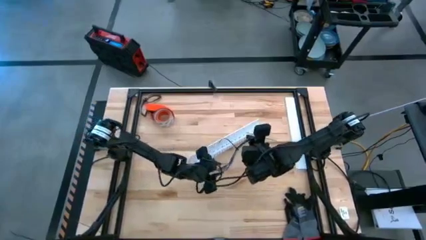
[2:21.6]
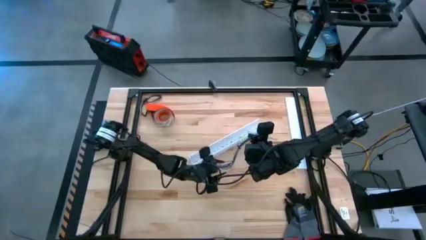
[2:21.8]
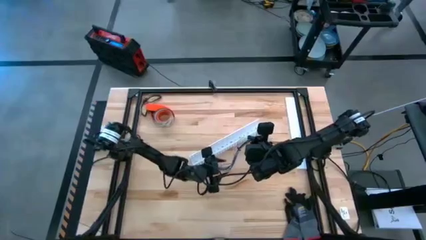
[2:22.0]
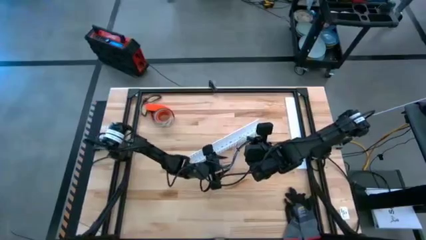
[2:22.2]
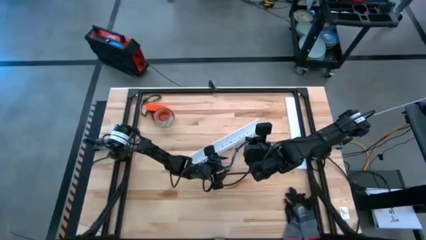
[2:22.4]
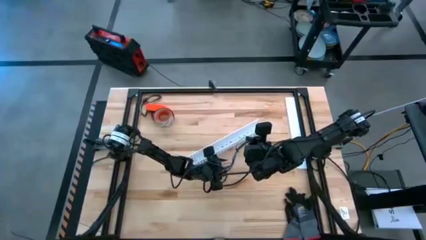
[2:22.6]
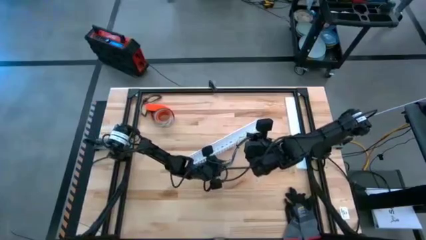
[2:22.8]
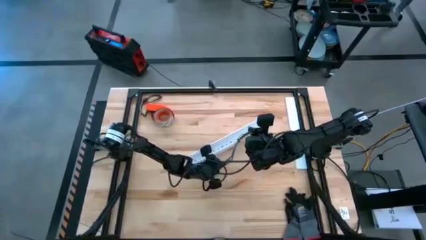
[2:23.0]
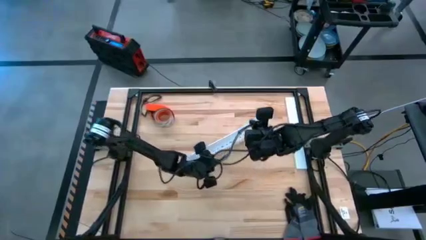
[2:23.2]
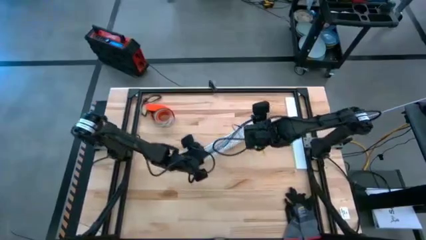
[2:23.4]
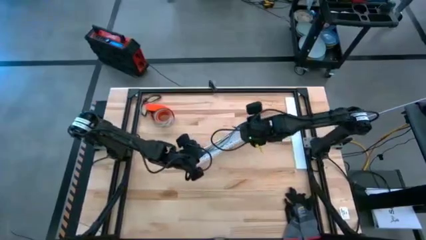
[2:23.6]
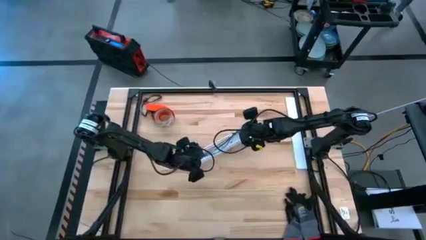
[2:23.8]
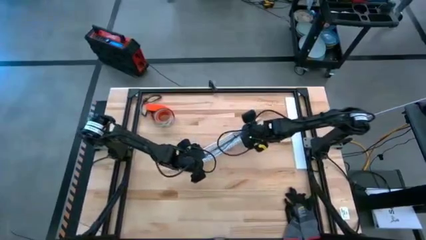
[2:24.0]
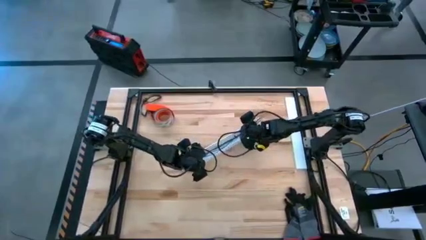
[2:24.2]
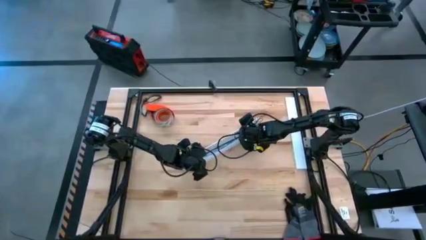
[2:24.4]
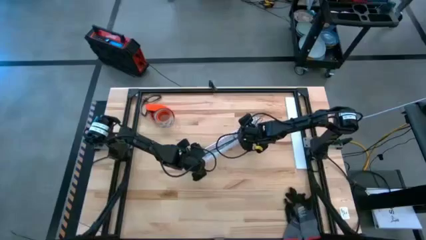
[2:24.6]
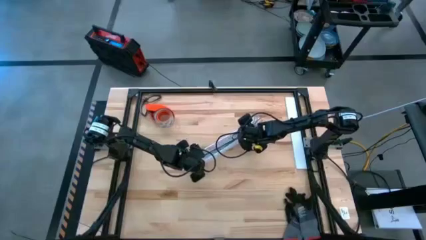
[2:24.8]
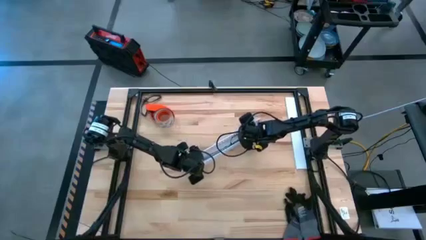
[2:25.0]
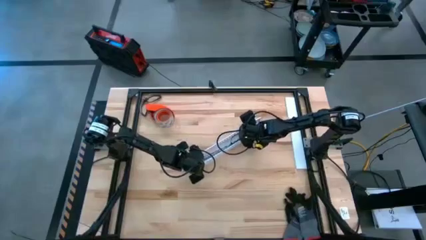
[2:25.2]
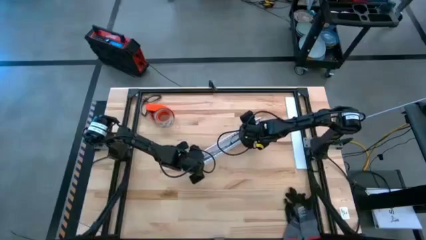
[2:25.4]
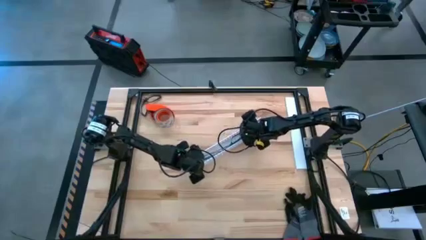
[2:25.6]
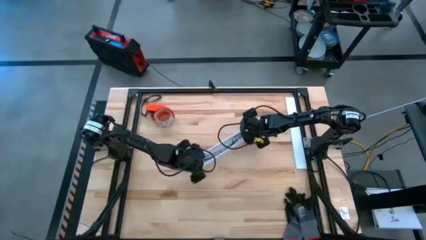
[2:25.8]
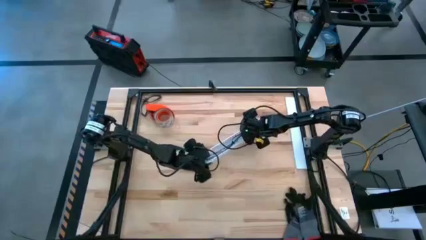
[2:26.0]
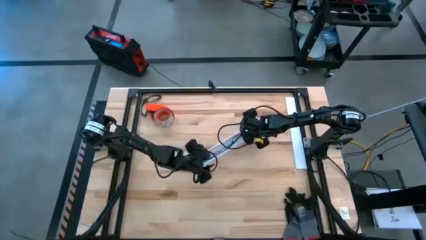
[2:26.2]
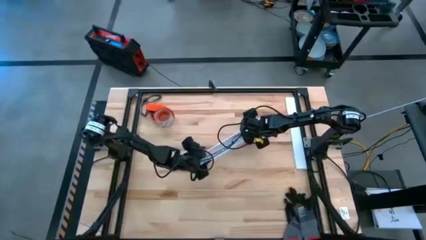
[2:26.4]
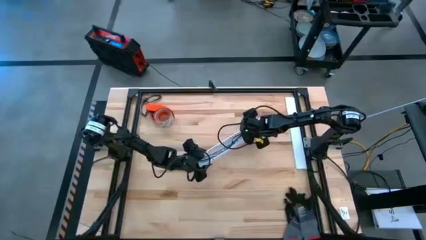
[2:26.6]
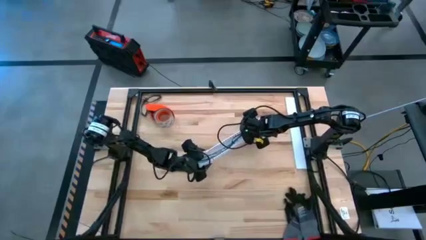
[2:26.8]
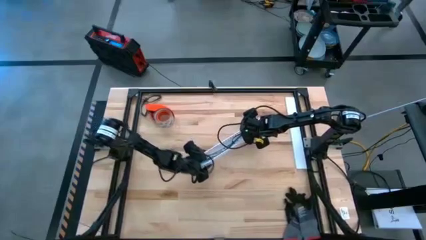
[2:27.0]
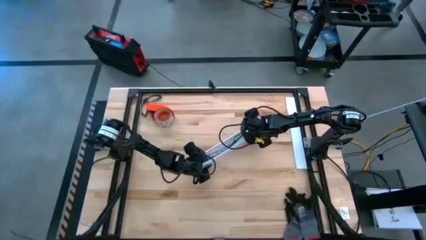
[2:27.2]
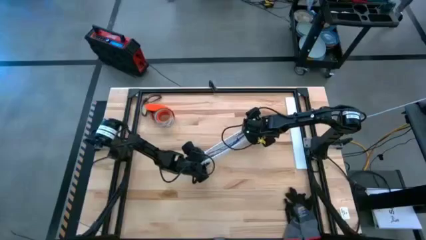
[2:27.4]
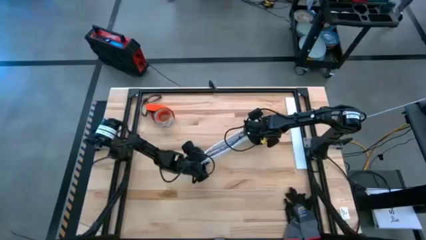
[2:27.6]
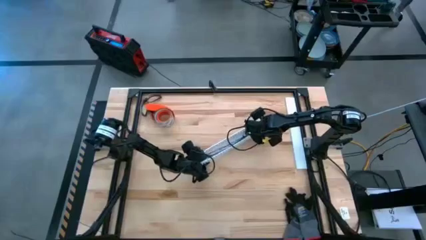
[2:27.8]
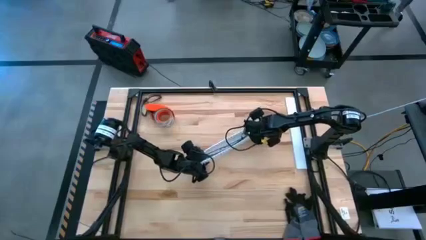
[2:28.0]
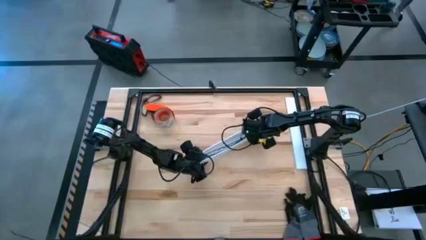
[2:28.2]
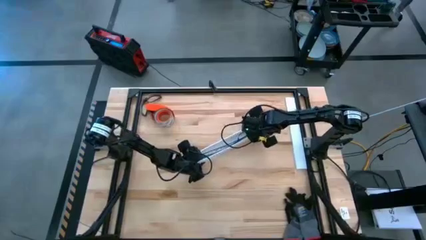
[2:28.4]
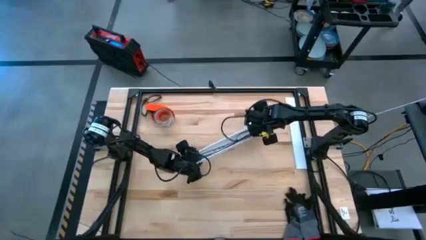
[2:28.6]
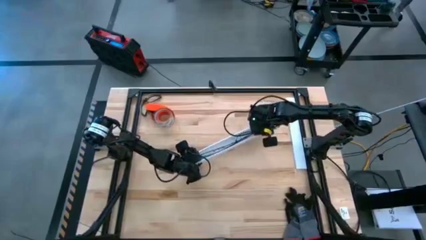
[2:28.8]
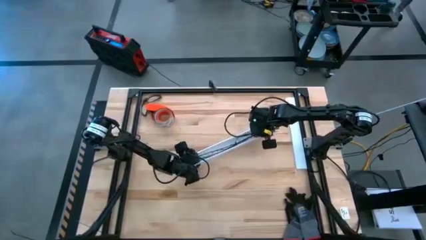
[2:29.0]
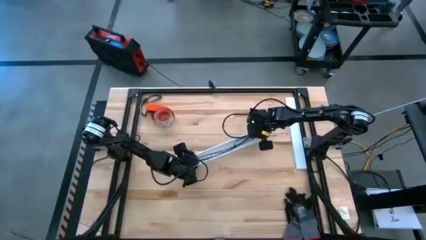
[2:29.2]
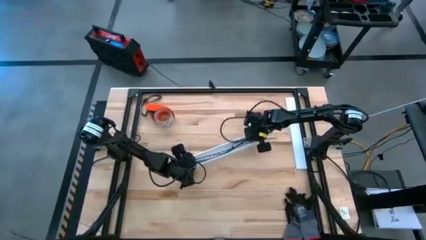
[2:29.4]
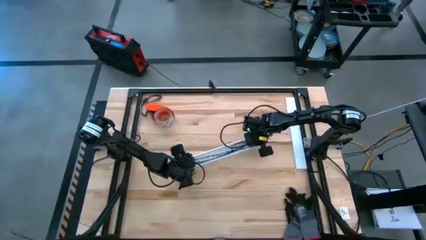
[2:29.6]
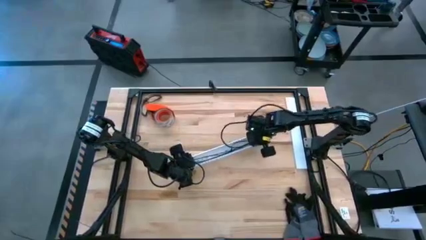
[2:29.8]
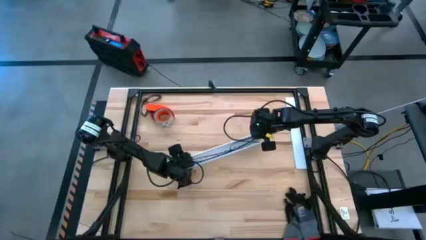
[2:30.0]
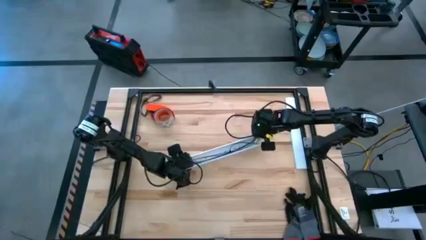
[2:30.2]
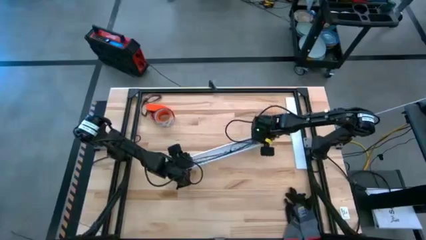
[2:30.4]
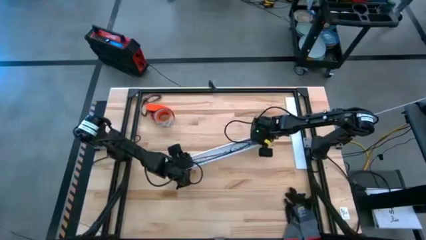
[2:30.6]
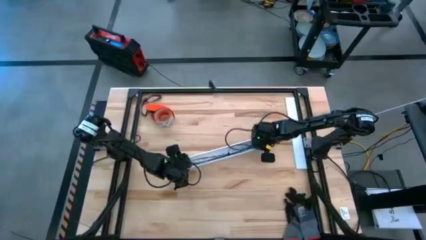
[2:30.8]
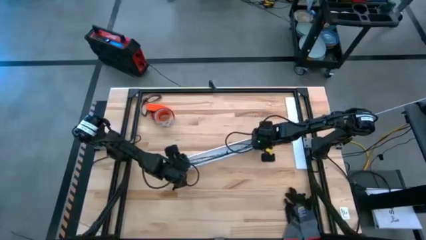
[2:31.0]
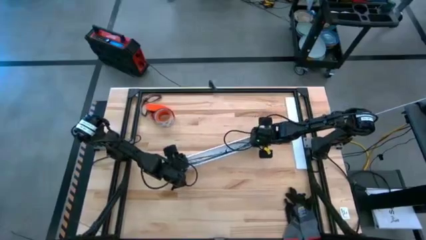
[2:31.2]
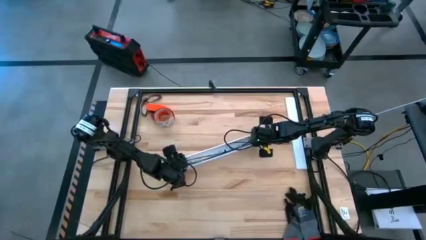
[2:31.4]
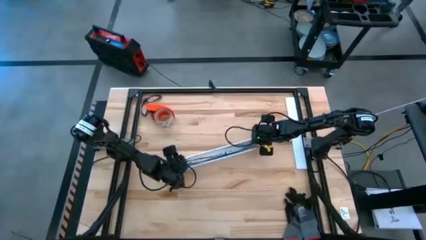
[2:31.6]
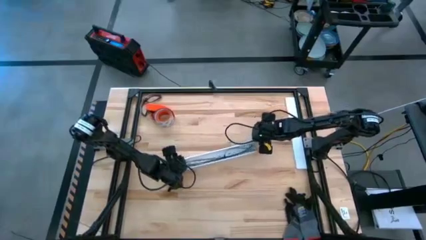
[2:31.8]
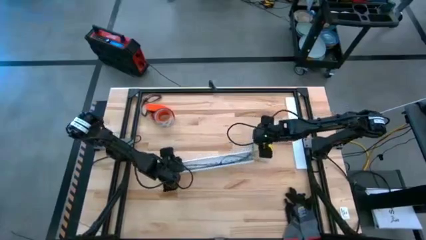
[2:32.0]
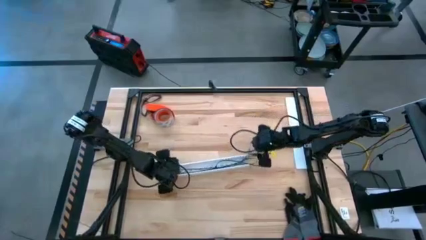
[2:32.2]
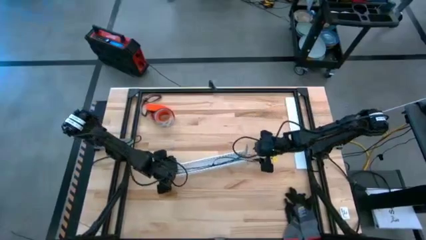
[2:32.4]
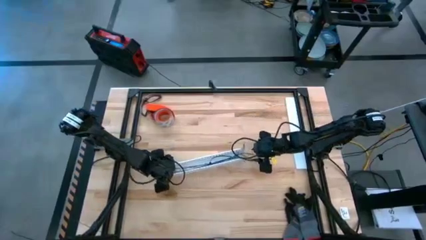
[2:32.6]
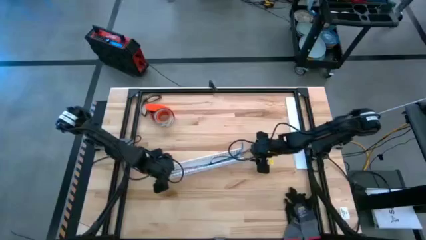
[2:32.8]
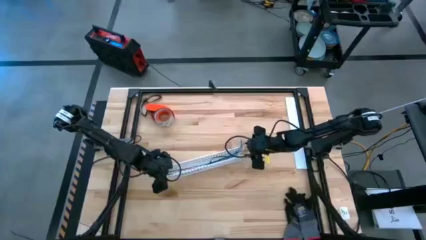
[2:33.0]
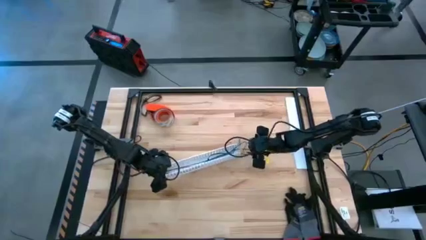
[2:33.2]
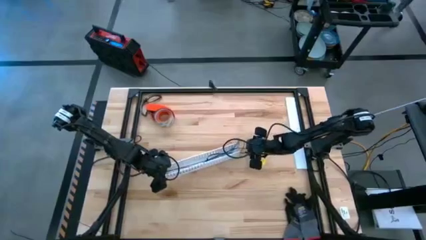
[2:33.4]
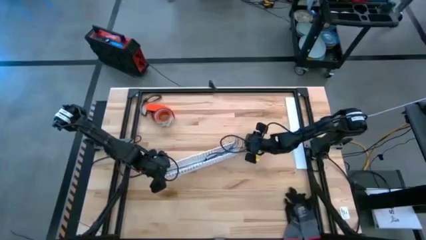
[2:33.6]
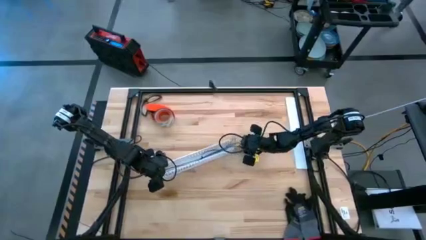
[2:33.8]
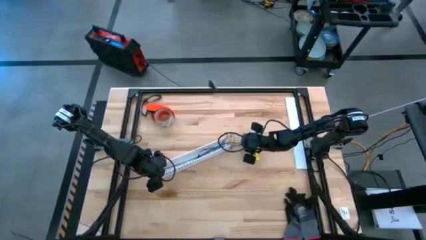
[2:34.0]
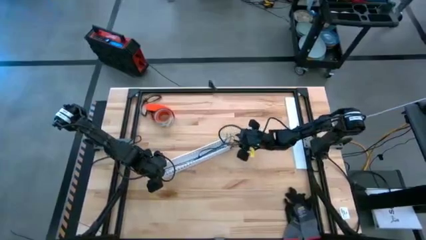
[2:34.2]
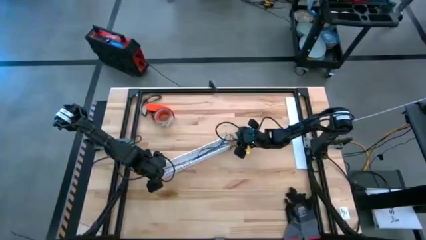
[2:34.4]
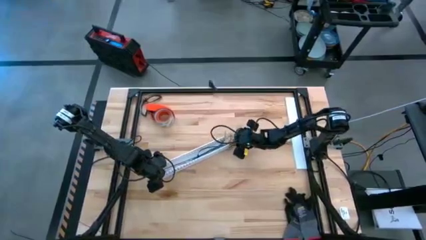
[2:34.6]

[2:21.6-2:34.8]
Task: Ziptie cables
Put the black zip tie cables on the white cable duct
